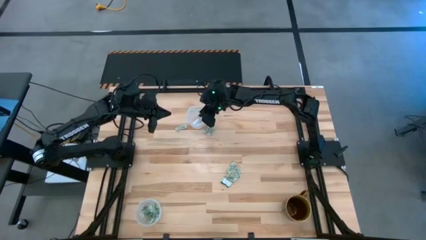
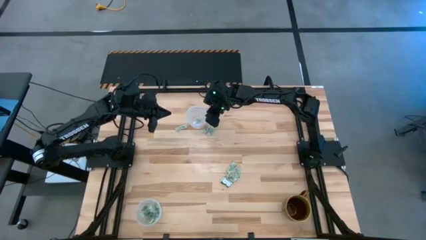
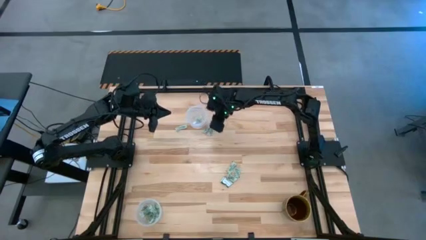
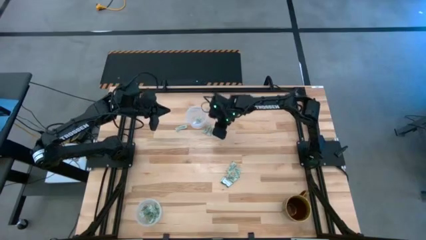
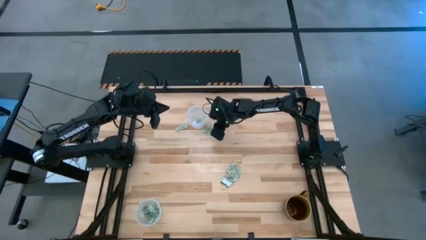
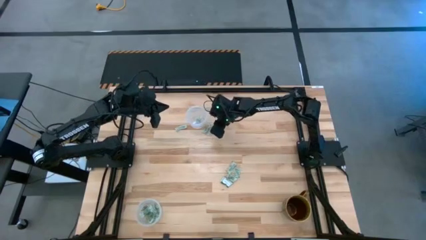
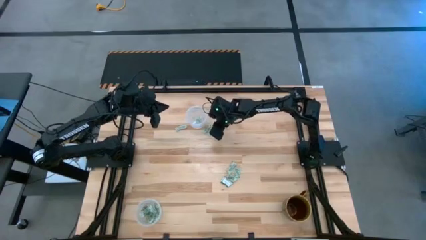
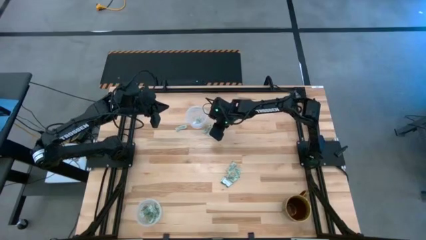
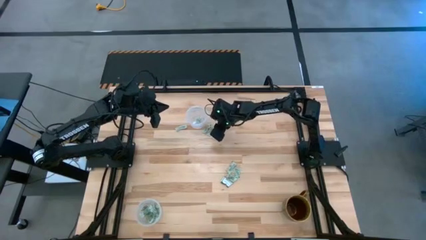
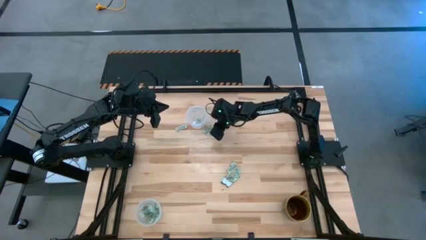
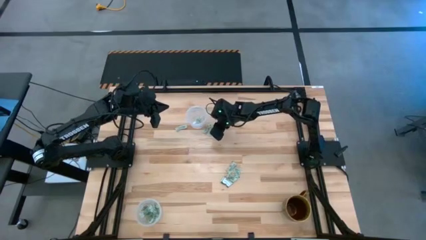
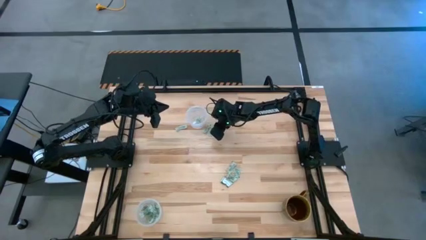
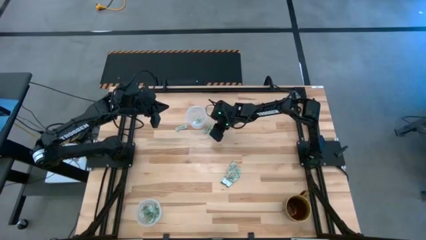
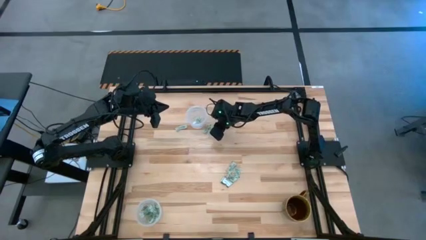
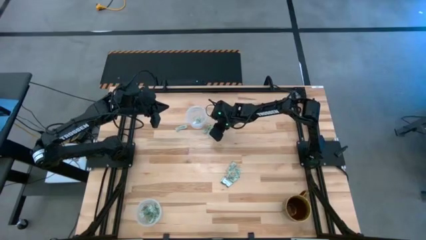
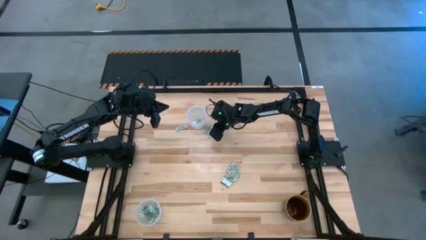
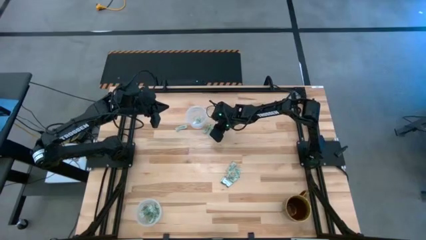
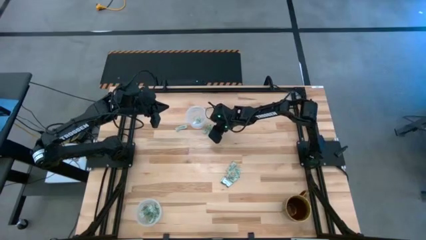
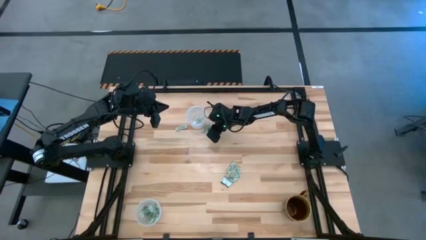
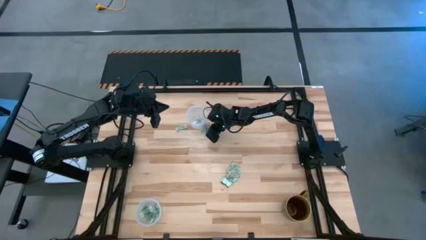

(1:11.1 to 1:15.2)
Task: Pick and place Stevia / Truvia into bins
Put the stevia packet into the top transparent container

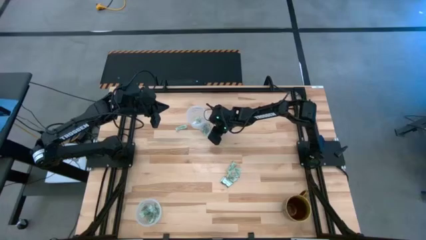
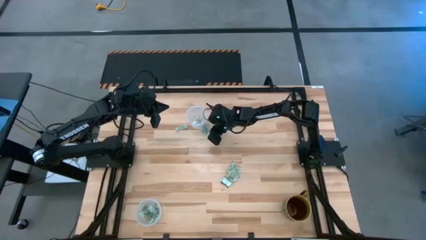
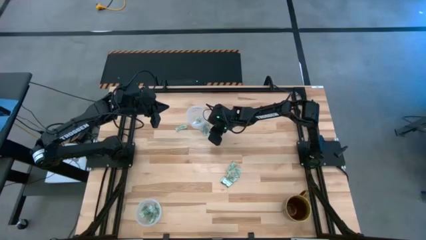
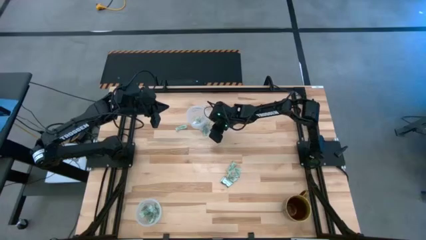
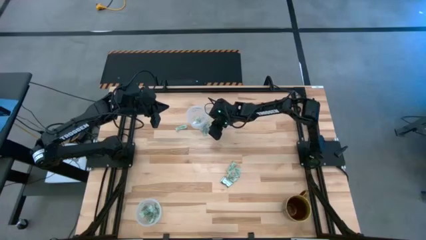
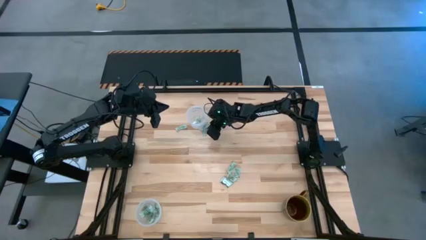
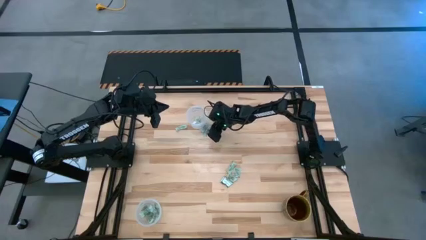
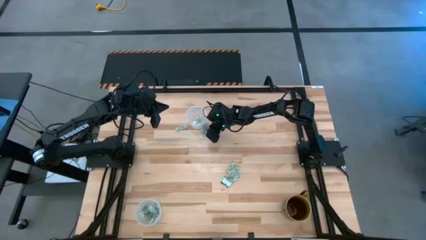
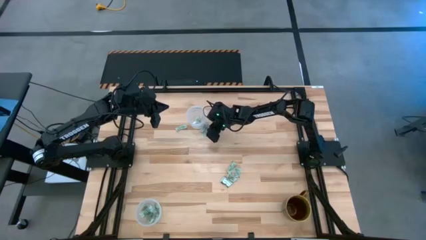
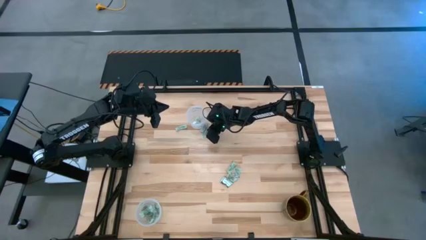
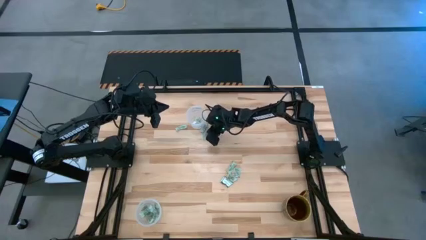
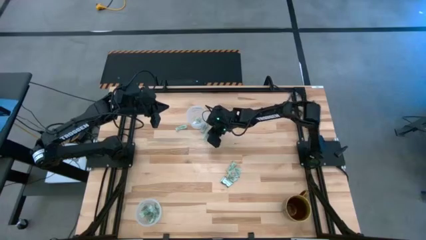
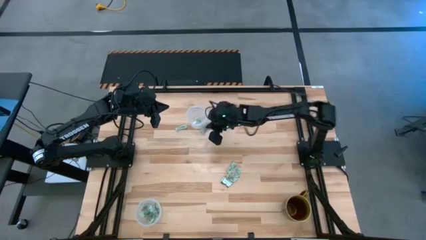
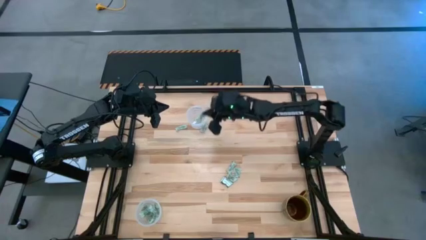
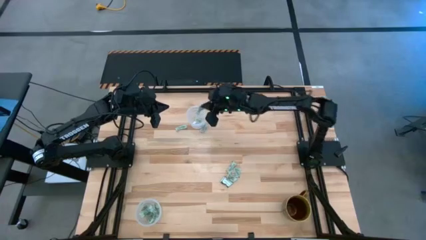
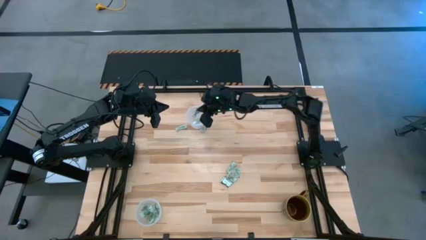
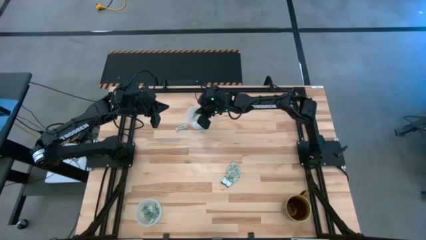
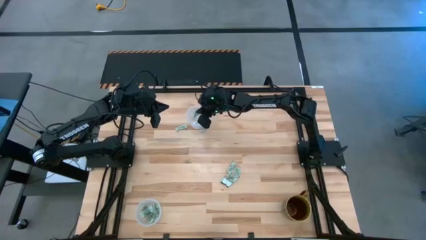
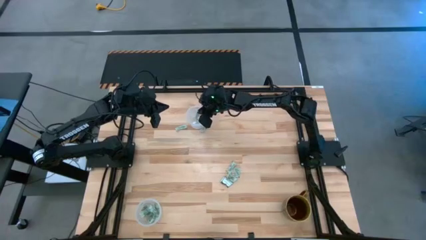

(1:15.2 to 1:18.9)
Put the stevia packet into the top transparent container

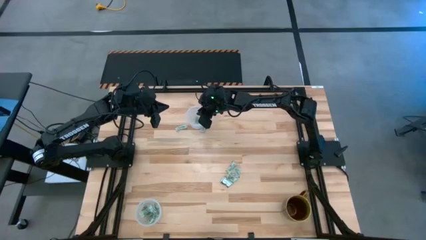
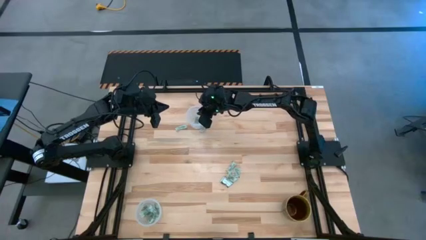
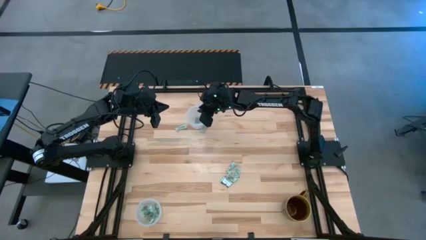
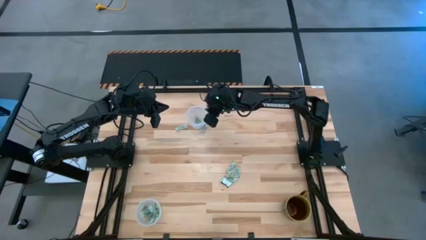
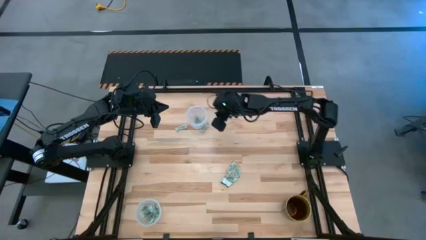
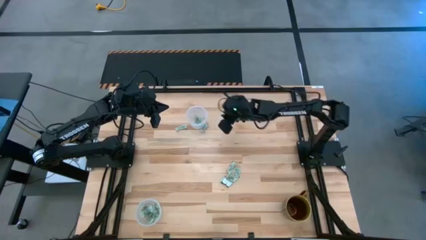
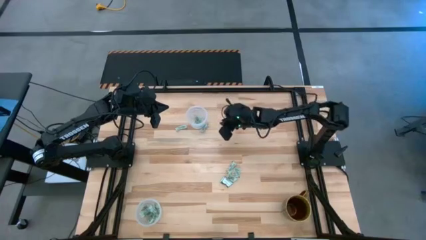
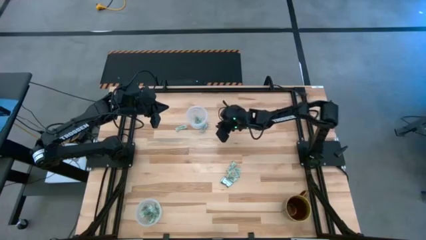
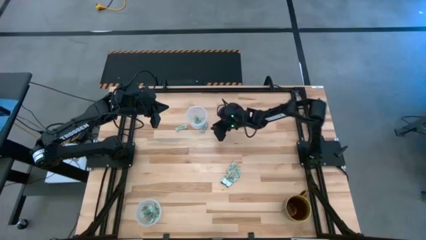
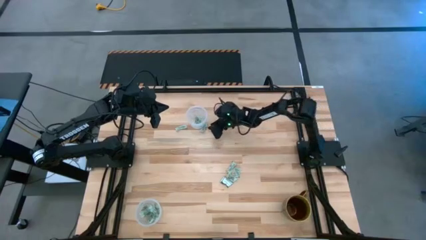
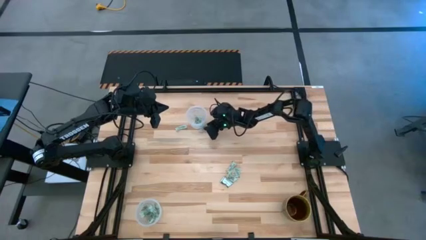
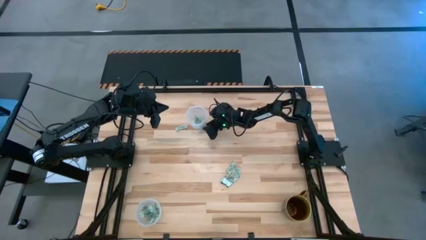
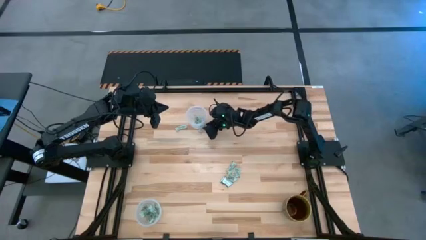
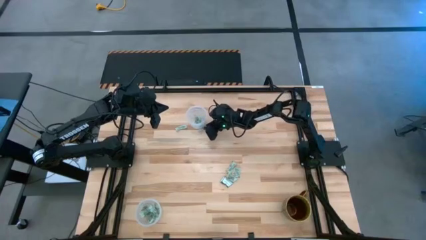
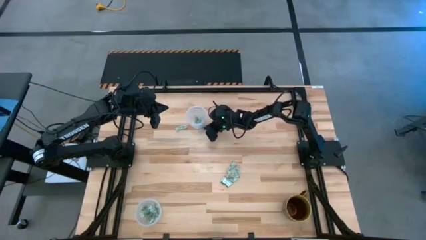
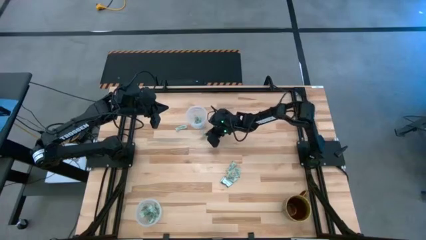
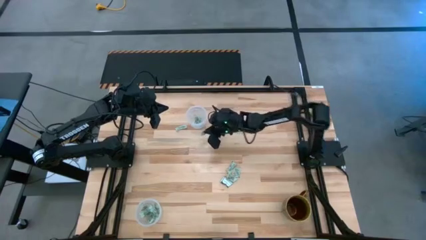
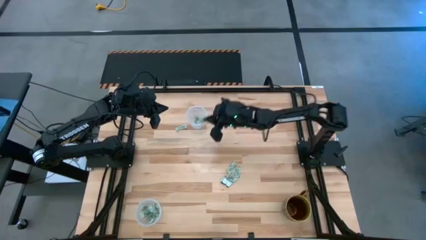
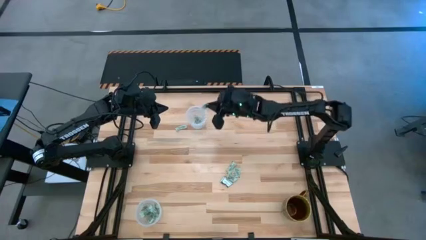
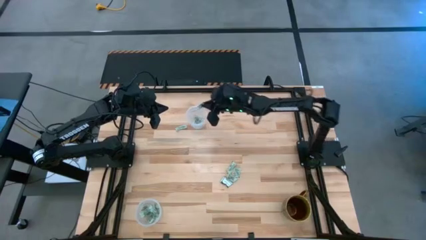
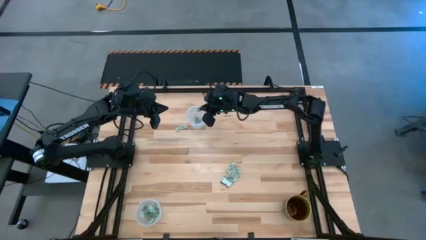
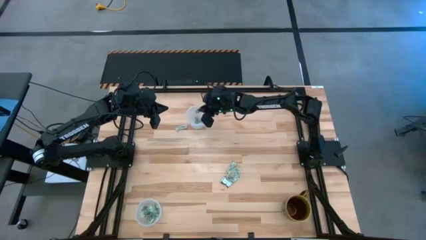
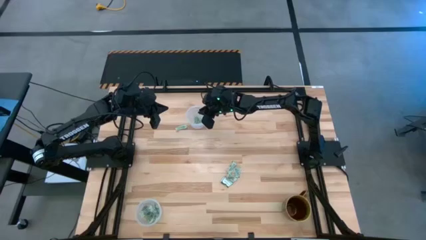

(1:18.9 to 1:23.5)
Put the stevia packet into the top transparent container

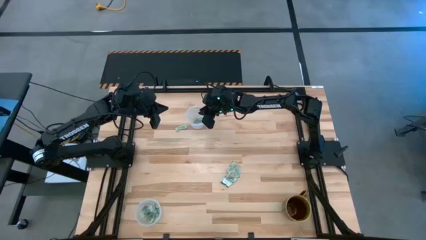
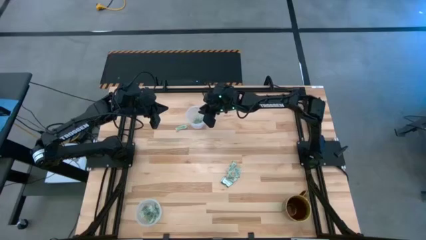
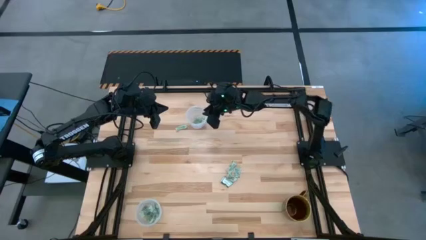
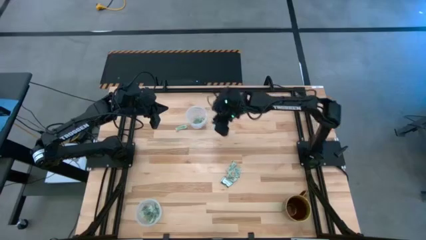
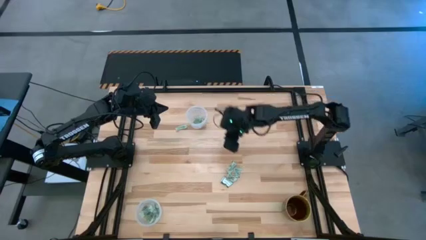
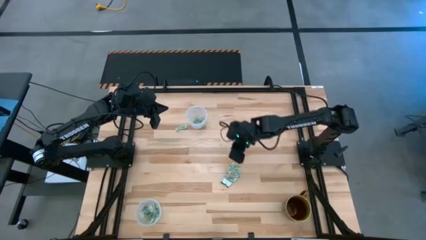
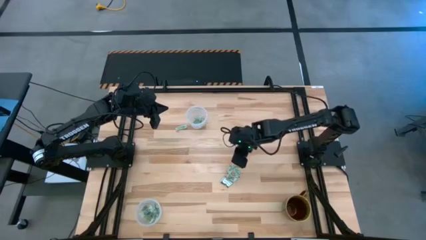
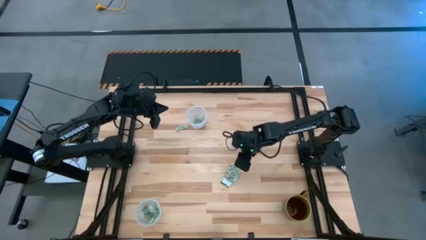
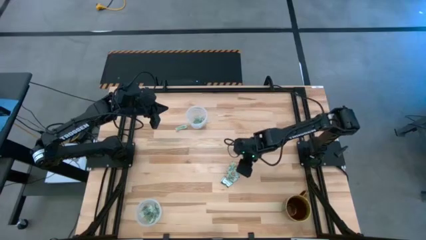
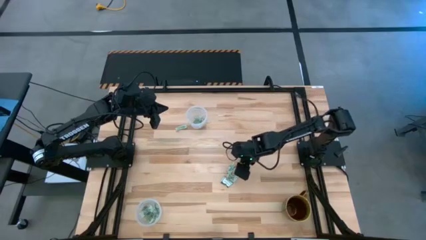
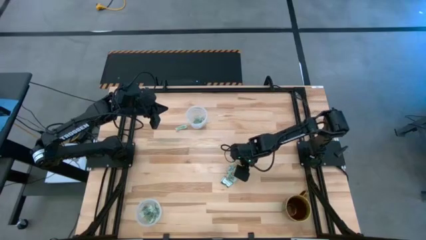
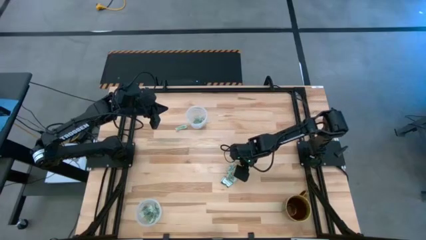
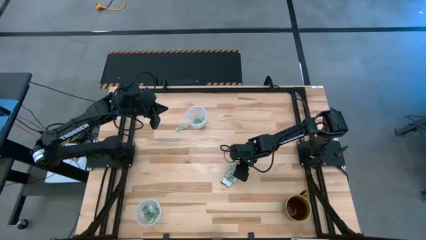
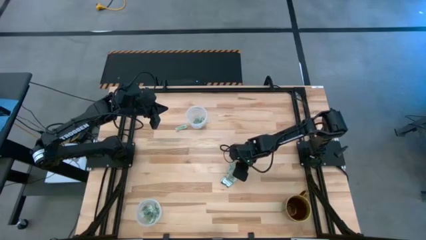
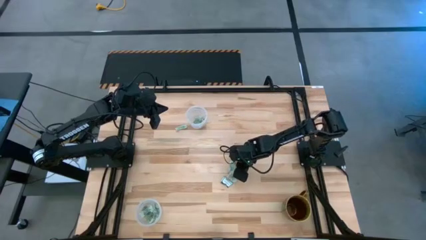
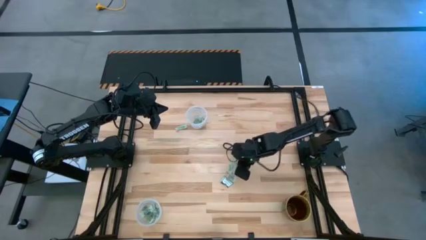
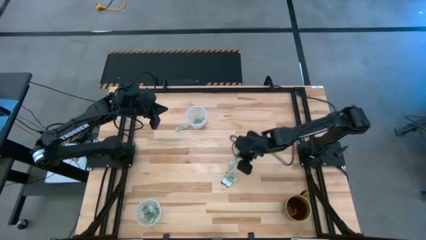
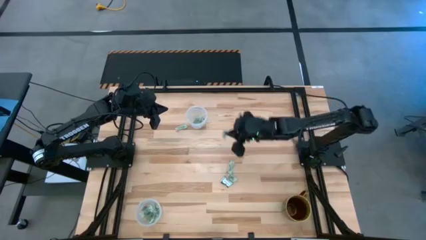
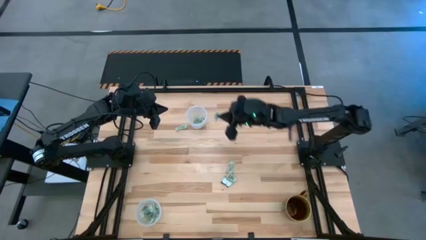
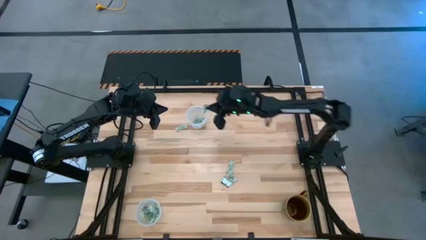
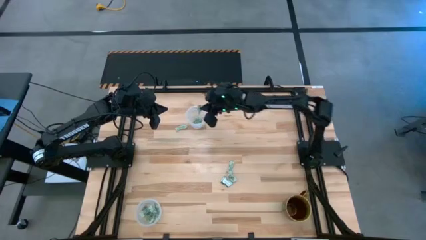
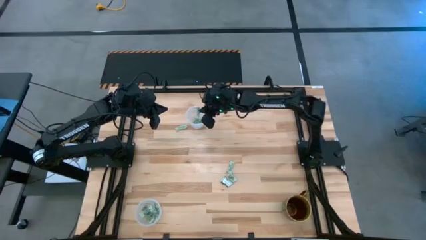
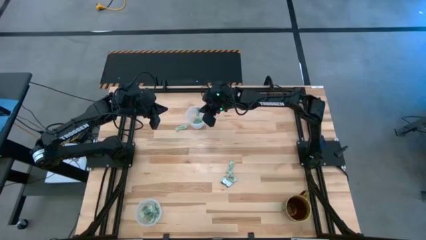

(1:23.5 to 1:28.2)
Put the stevia packet into the top transparent container
